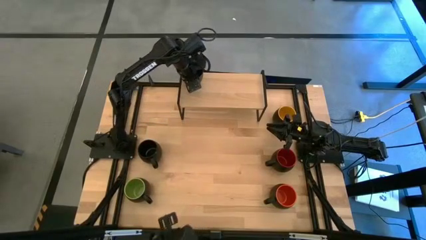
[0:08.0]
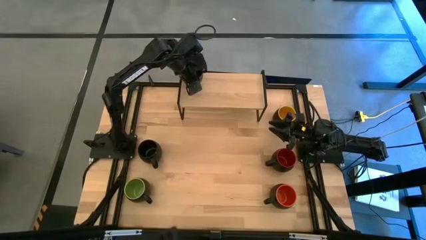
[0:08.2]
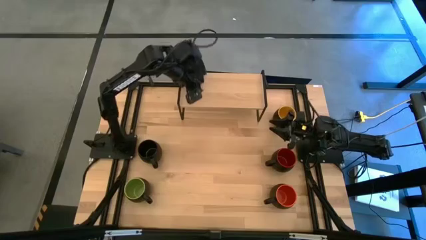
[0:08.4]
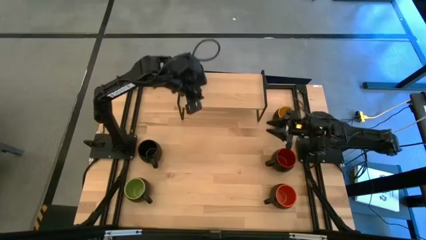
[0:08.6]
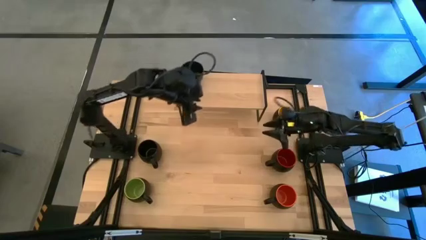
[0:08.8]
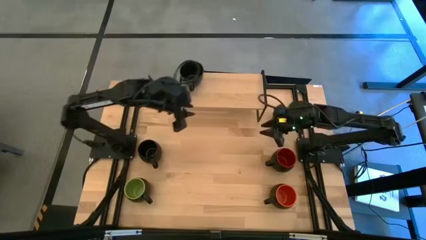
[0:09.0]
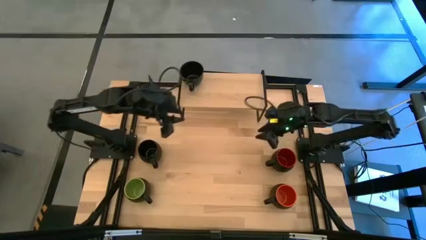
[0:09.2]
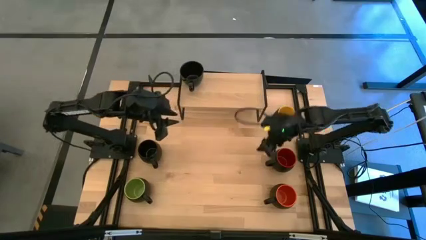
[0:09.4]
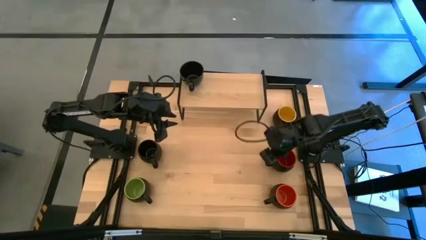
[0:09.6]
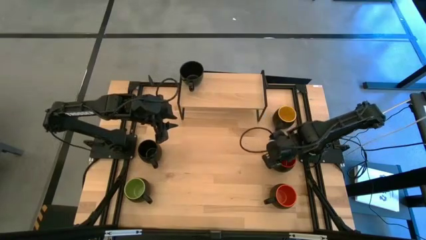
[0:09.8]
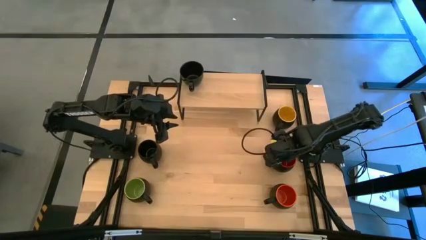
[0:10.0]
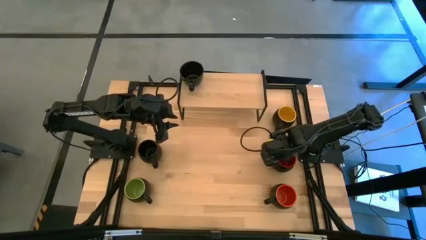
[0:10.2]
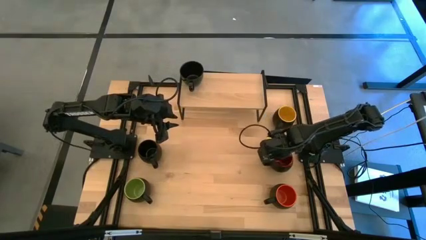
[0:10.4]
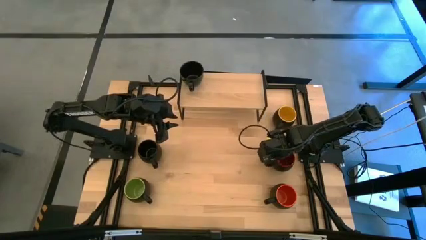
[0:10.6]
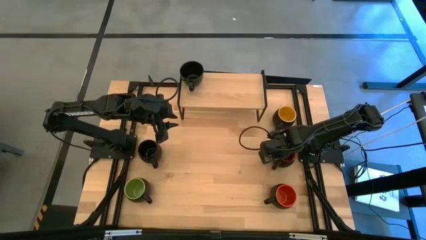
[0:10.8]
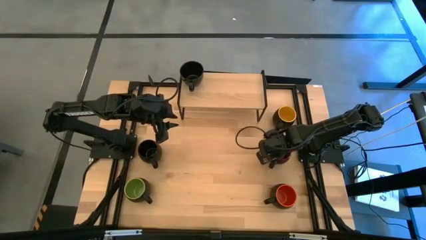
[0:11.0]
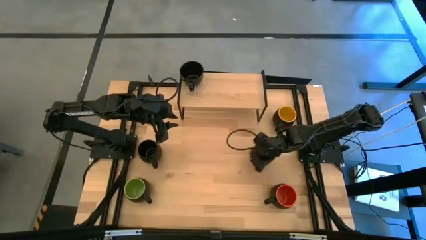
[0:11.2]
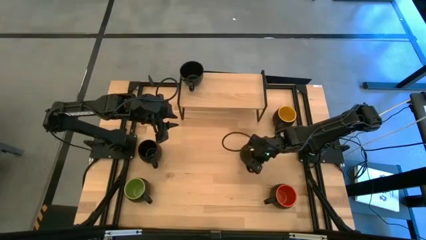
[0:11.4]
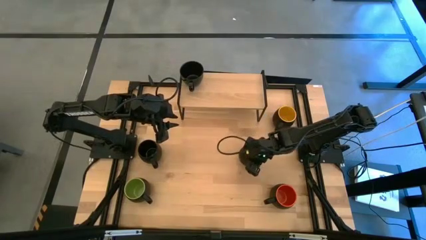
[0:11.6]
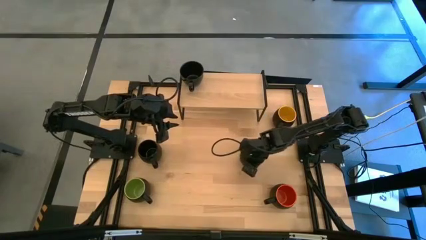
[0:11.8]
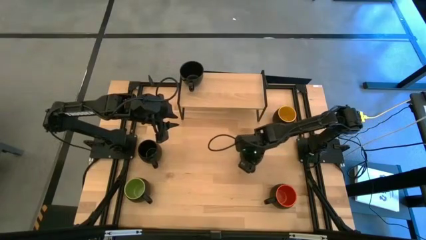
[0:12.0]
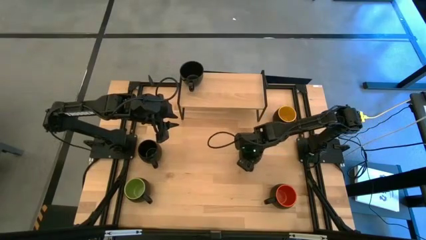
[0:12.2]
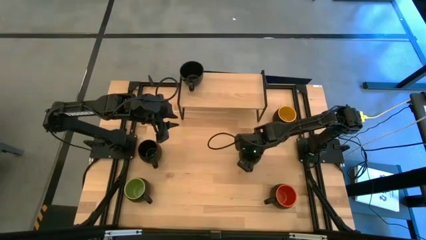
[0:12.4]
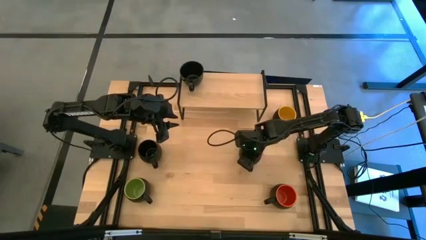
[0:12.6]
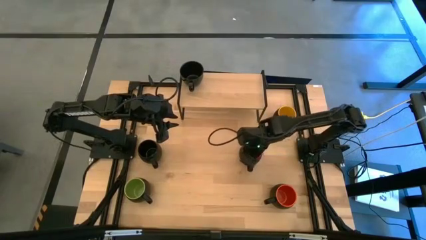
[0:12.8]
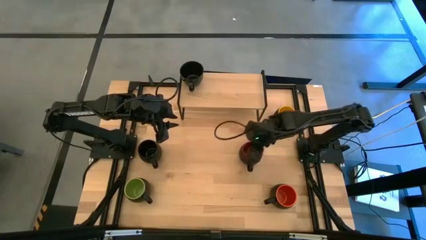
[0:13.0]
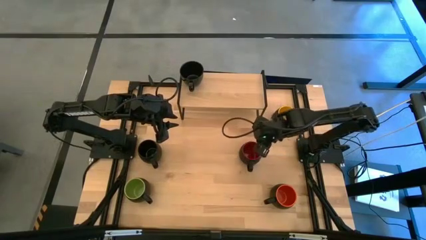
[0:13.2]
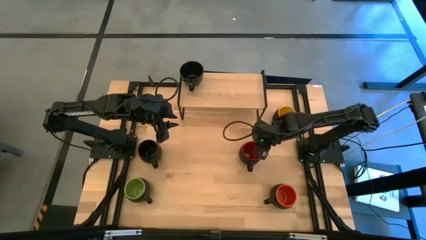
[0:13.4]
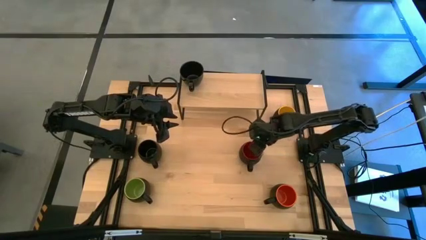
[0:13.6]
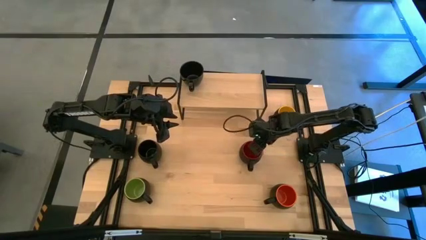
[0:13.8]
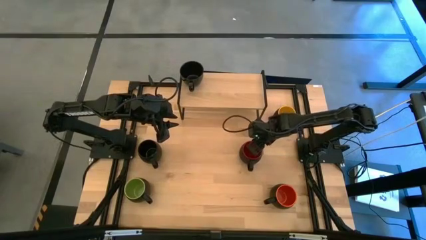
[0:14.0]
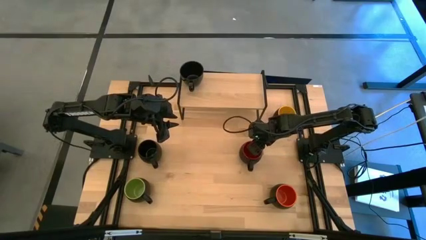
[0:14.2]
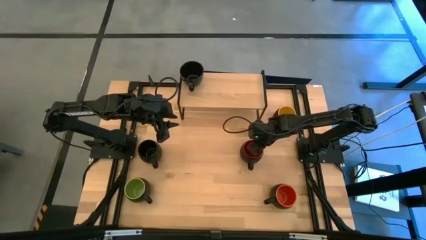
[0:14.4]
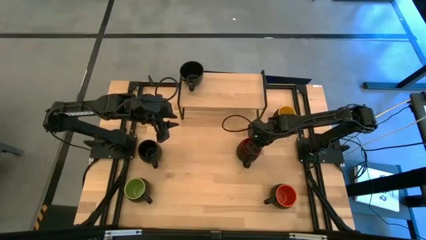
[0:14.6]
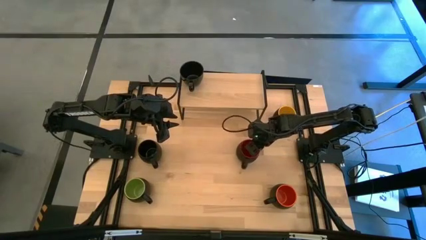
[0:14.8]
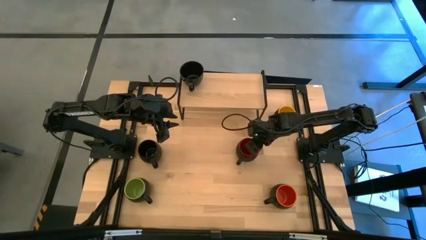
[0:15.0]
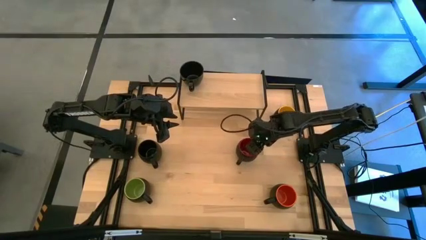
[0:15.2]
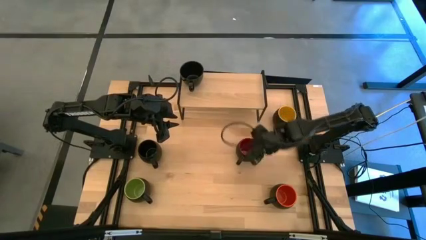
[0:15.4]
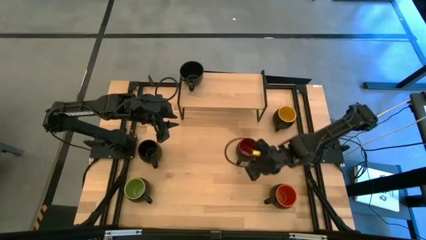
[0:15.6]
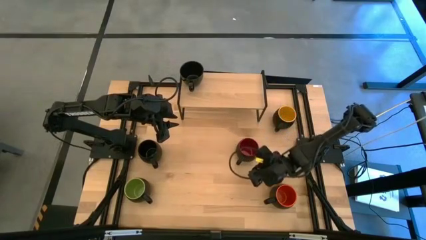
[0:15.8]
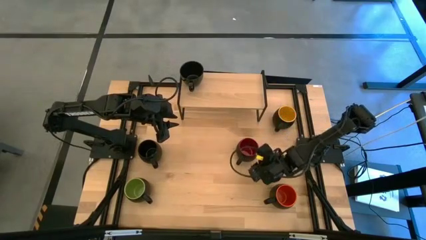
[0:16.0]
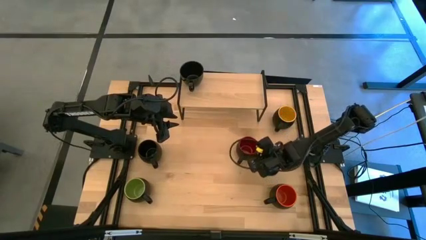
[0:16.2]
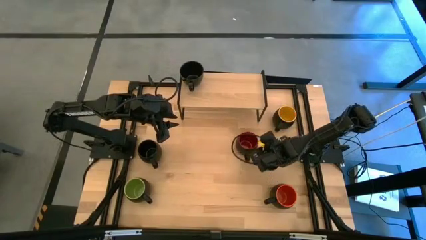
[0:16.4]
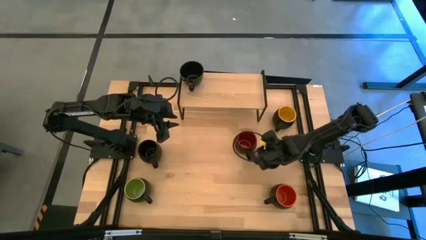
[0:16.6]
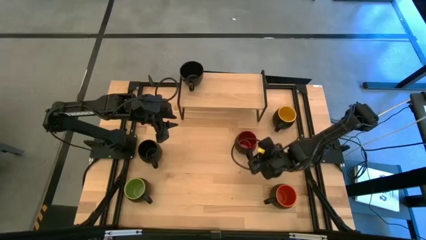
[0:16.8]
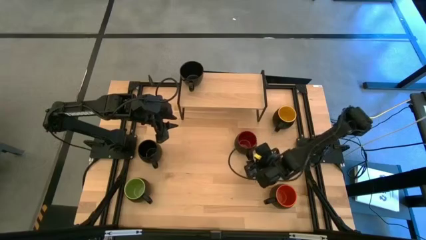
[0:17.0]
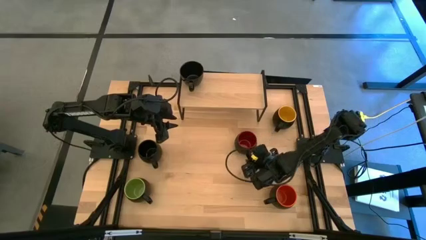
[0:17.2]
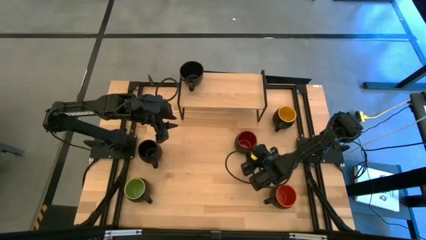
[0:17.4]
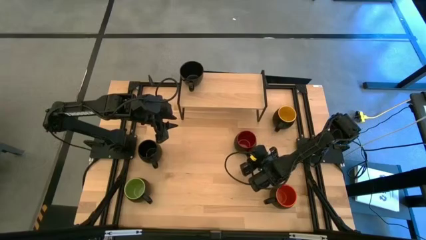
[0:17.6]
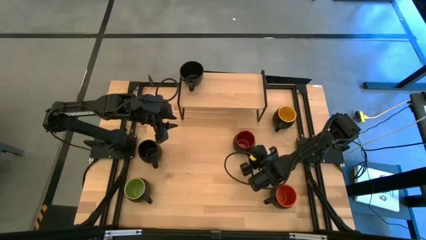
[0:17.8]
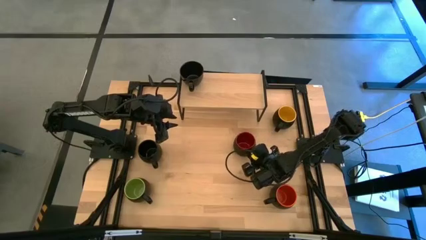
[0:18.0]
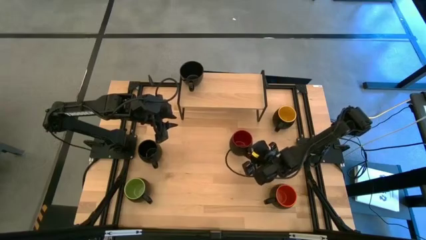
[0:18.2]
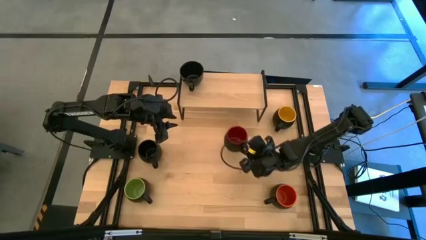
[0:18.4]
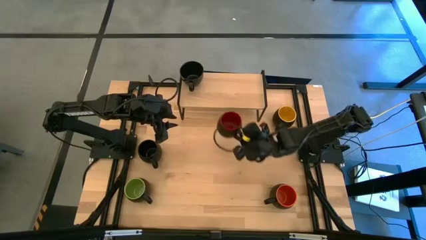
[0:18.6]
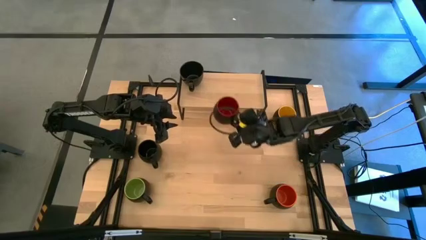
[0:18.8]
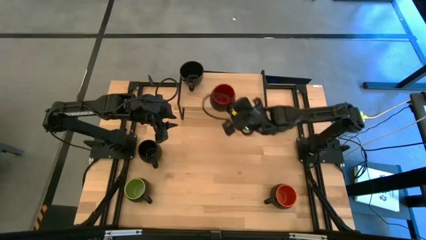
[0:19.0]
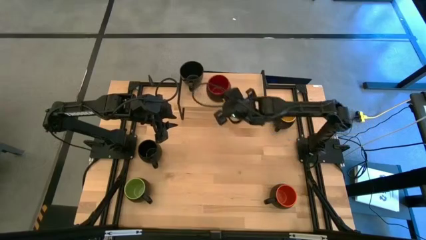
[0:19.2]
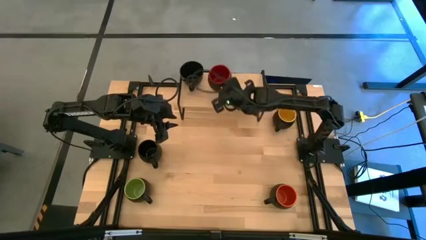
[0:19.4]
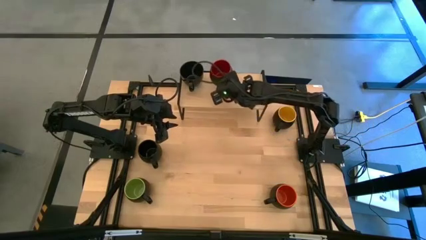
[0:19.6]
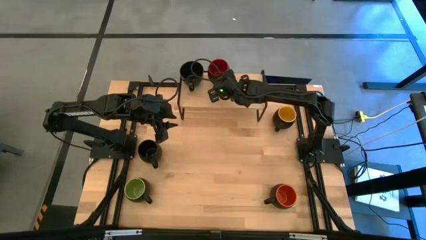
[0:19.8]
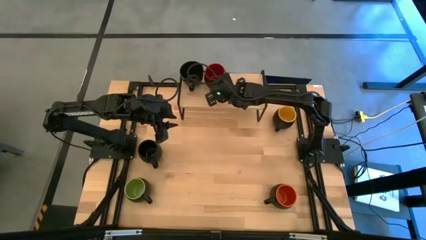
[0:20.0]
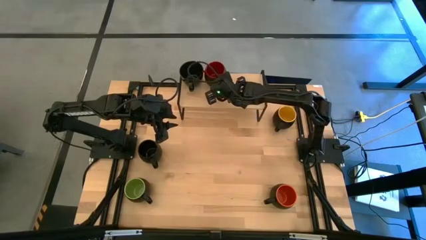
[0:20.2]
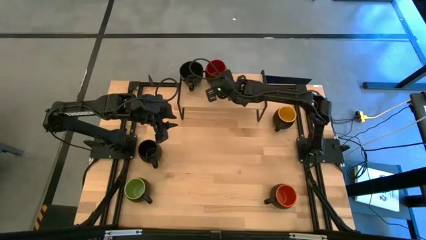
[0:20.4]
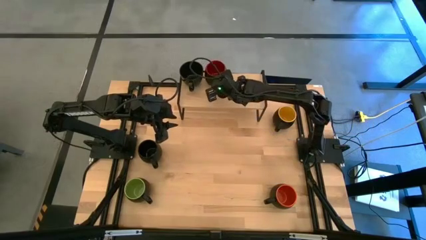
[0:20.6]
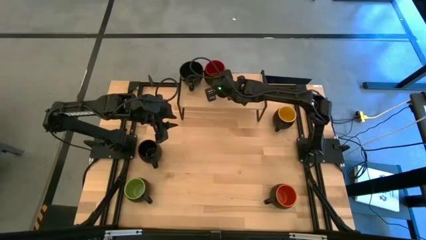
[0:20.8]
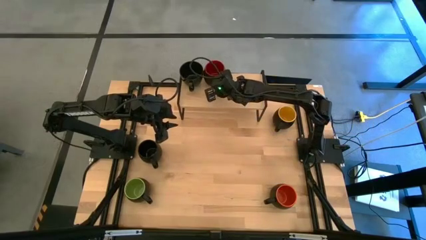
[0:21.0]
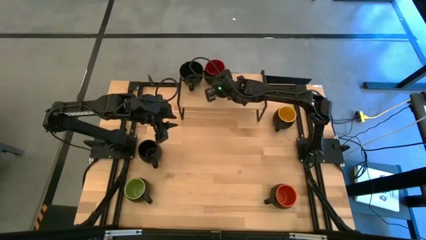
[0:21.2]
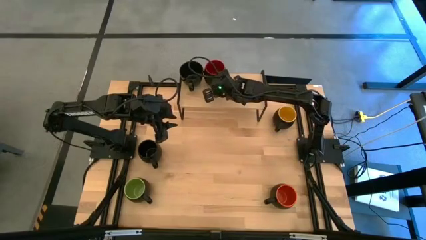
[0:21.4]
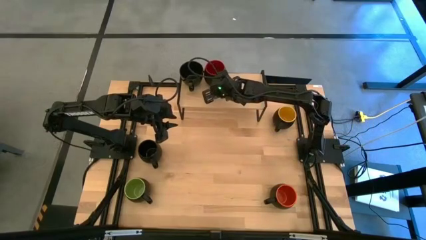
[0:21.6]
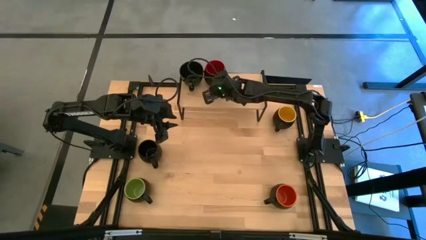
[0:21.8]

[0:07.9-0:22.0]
Task: Place coffee mugs
Put the red mug on the shelf

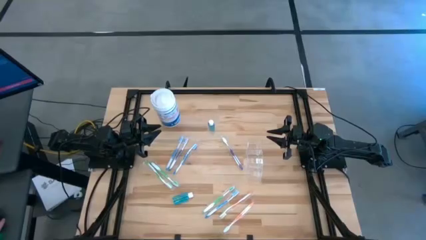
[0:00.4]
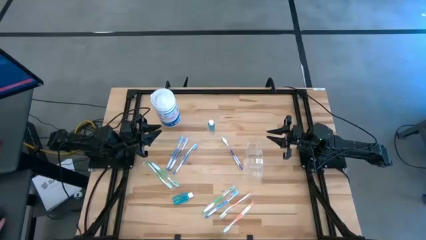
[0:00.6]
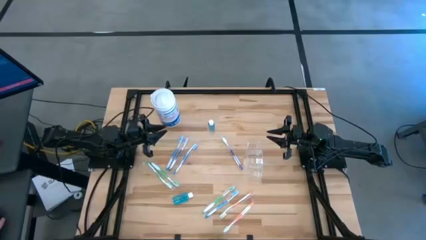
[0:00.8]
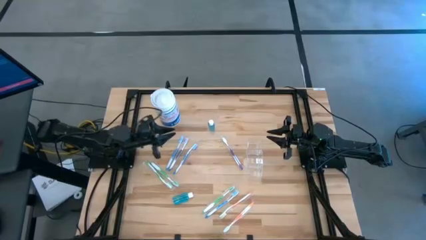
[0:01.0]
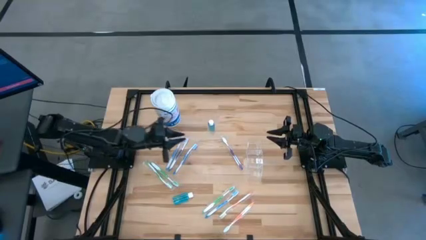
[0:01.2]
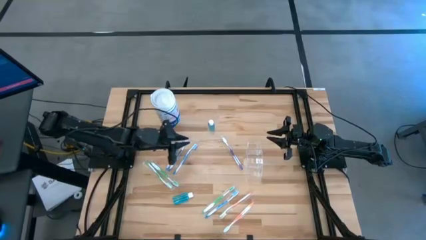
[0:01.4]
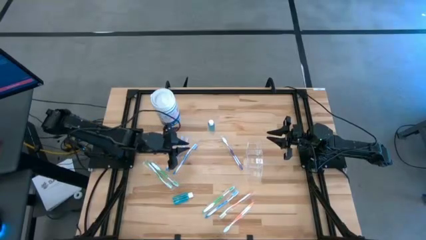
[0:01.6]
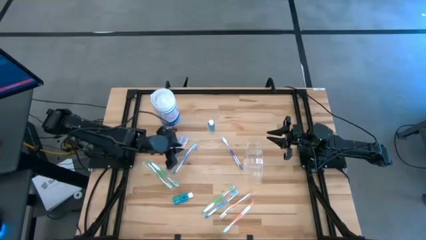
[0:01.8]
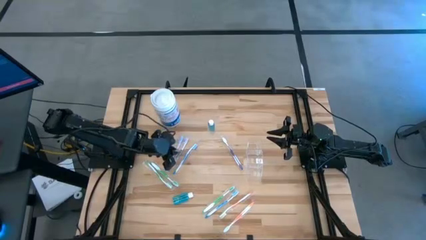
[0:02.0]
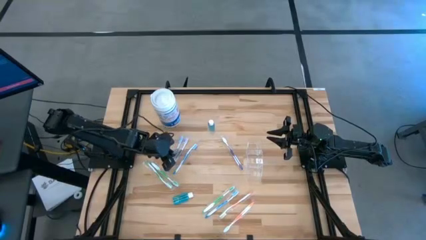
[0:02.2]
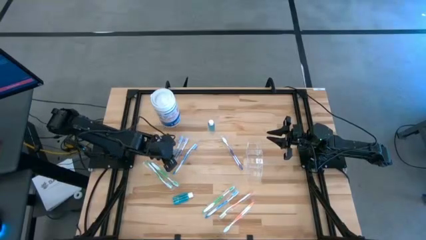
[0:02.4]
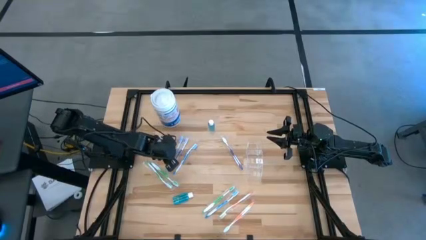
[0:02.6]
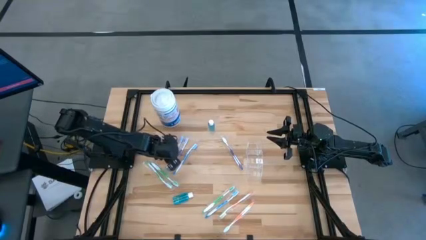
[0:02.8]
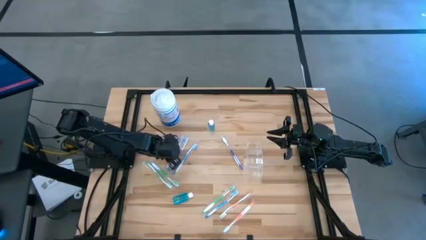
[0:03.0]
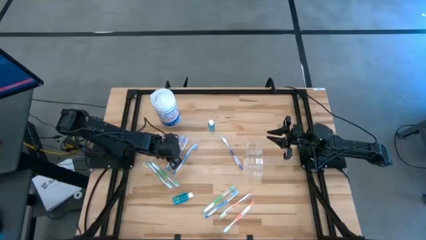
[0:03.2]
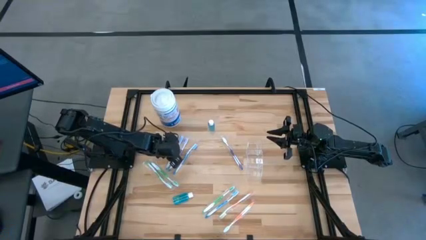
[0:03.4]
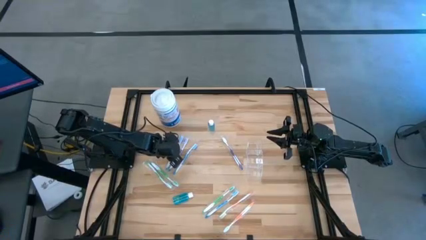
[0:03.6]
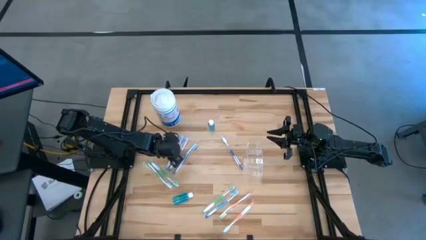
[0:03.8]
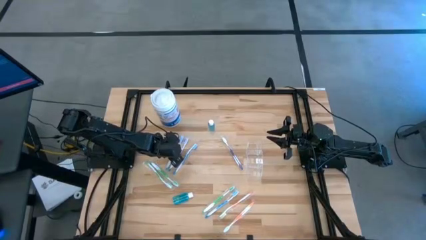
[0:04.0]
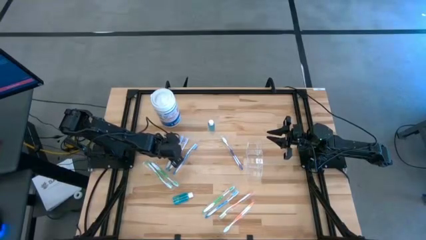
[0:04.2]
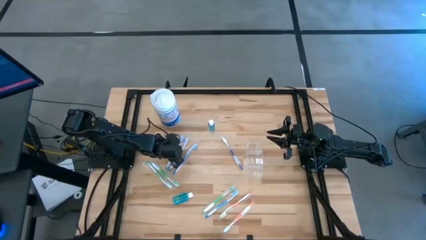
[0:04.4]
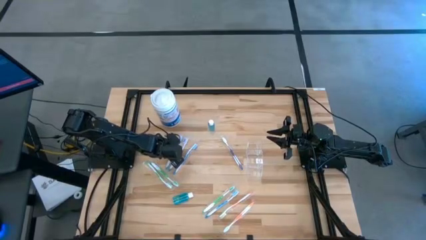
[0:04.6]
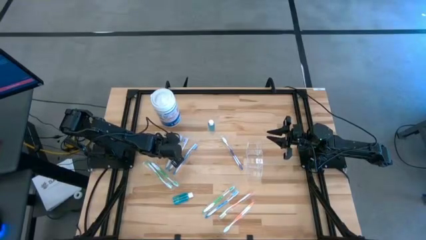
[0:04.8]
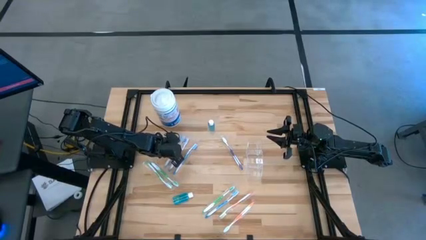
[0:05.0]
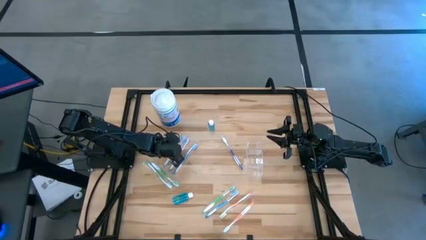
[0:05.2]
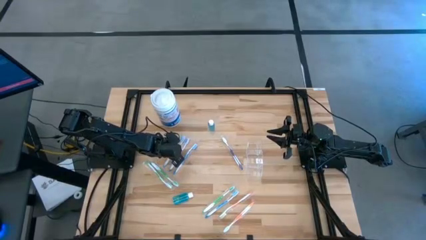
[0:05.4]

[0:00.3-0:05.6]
Task: Pick & Place toothbrushing station
Put the blue toothbrush into the transparent organizer
